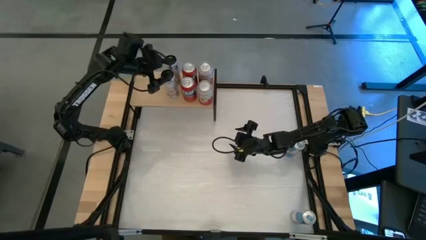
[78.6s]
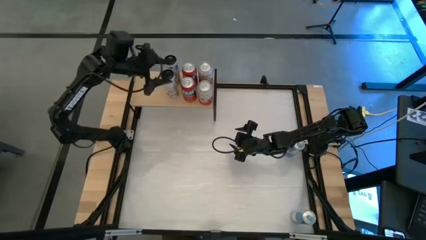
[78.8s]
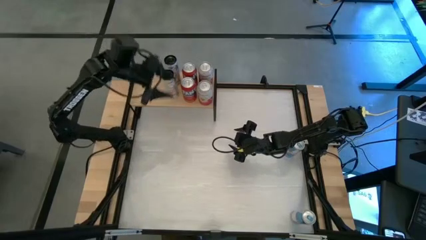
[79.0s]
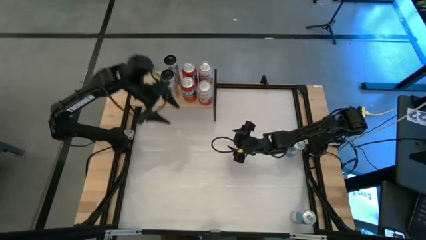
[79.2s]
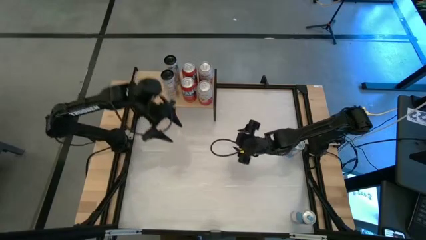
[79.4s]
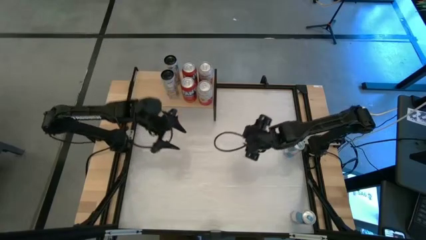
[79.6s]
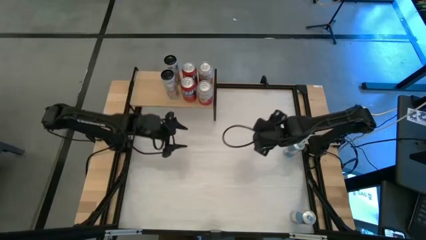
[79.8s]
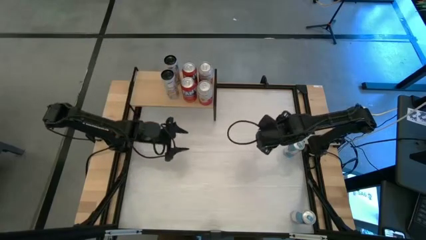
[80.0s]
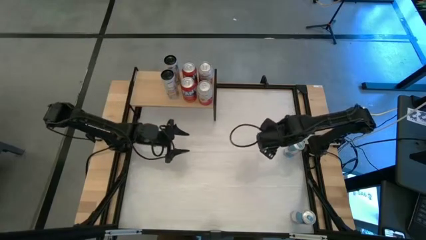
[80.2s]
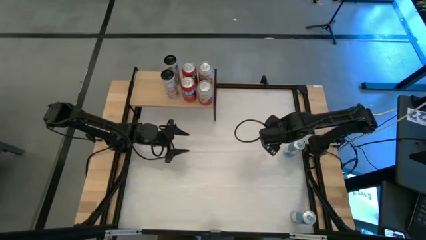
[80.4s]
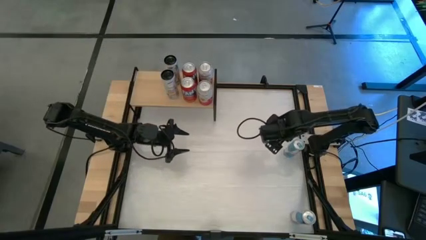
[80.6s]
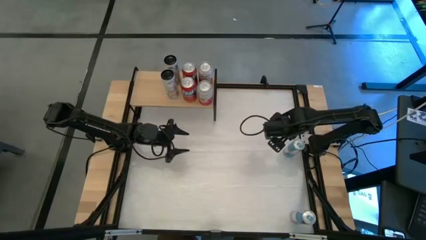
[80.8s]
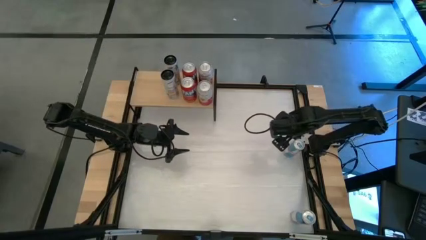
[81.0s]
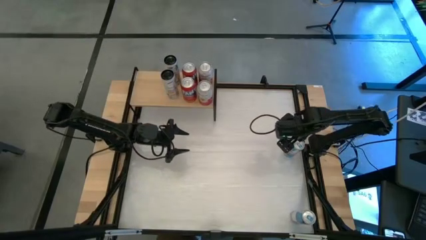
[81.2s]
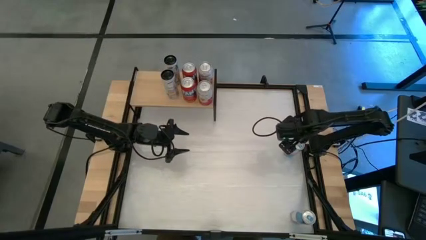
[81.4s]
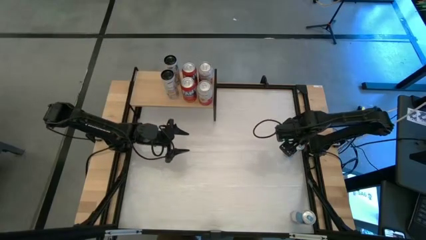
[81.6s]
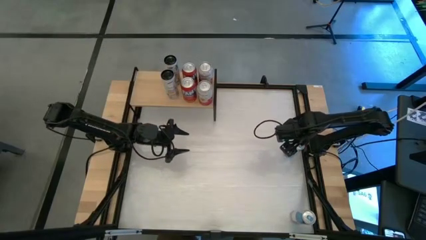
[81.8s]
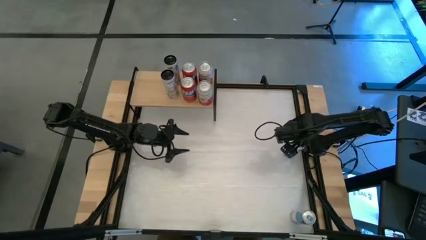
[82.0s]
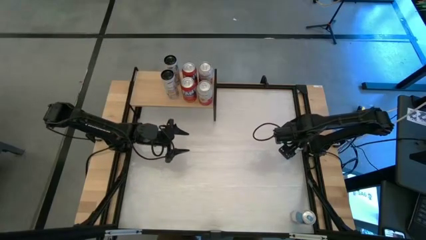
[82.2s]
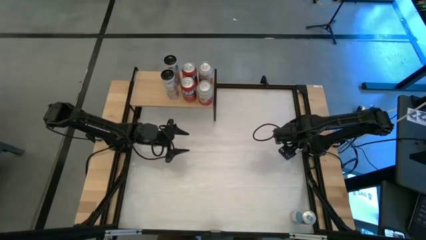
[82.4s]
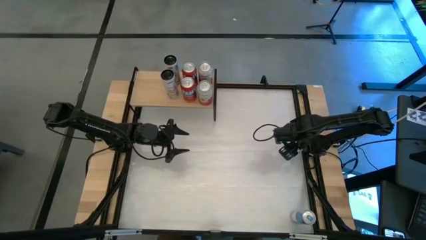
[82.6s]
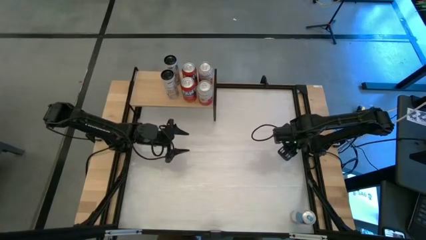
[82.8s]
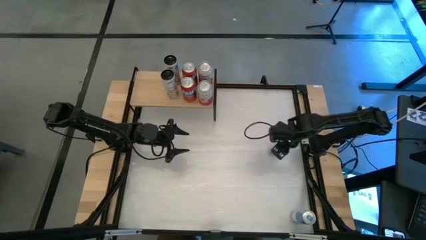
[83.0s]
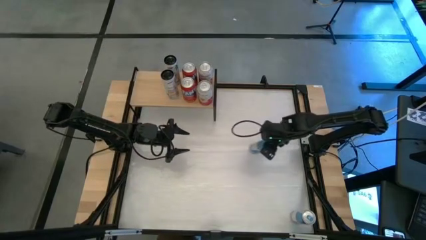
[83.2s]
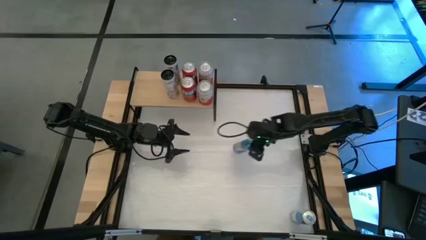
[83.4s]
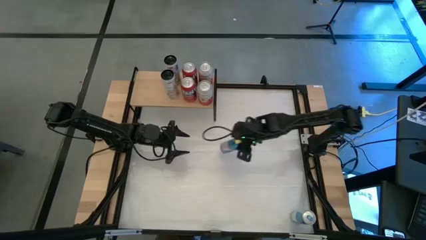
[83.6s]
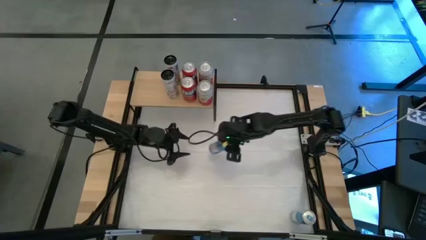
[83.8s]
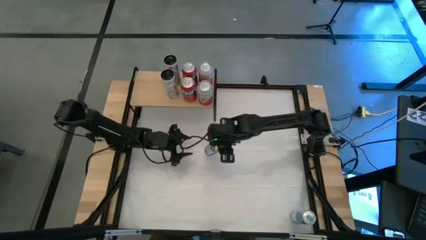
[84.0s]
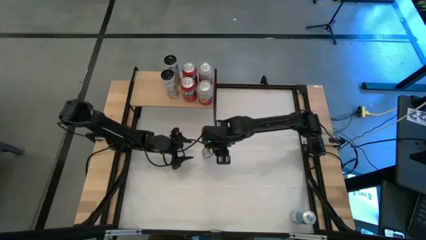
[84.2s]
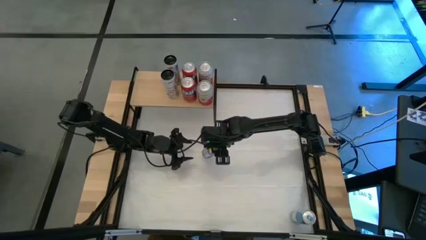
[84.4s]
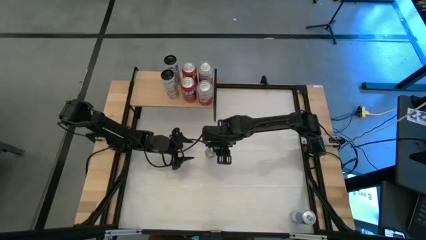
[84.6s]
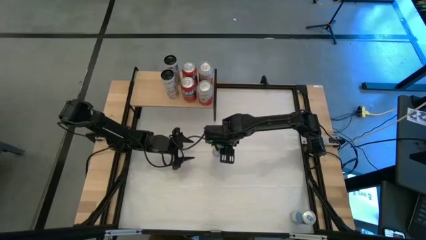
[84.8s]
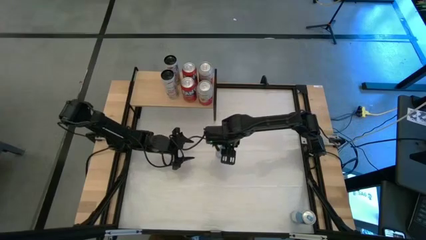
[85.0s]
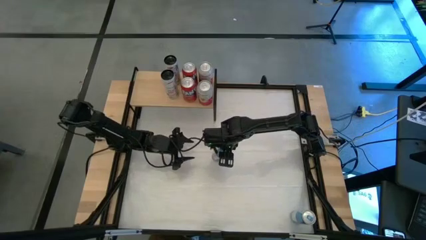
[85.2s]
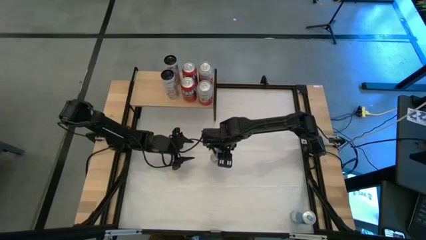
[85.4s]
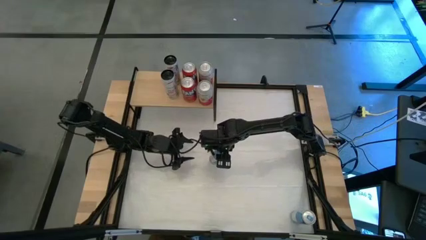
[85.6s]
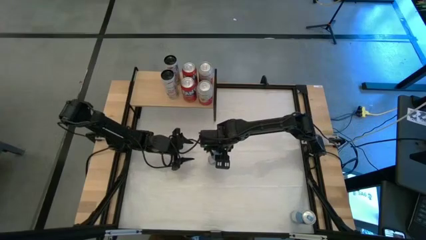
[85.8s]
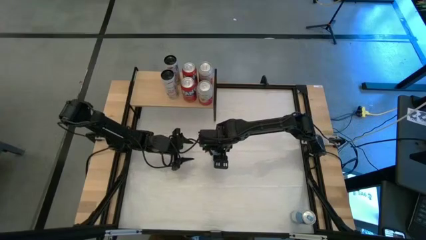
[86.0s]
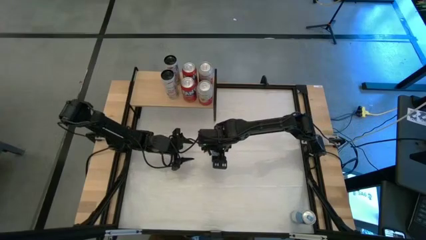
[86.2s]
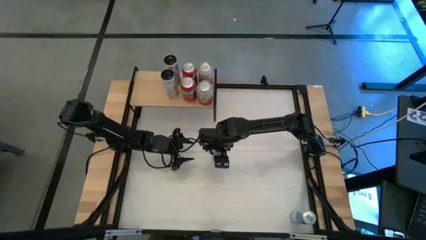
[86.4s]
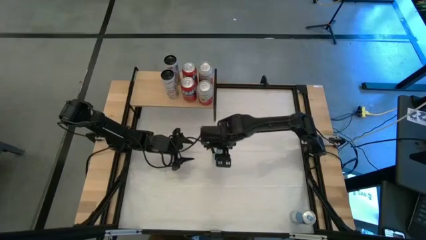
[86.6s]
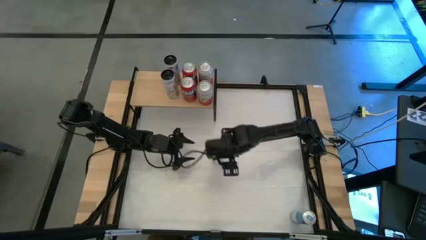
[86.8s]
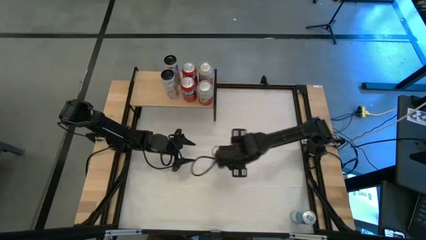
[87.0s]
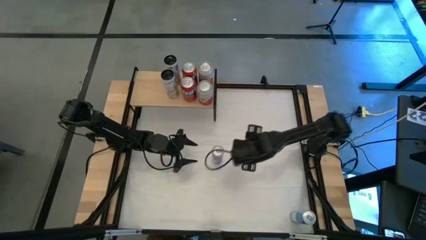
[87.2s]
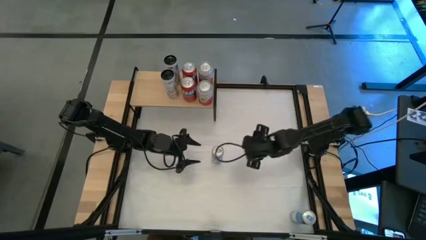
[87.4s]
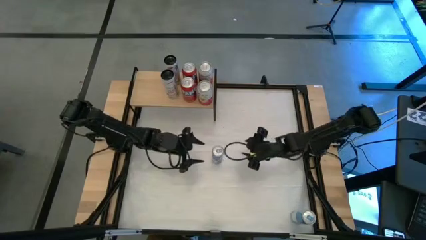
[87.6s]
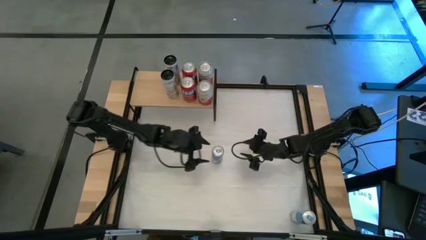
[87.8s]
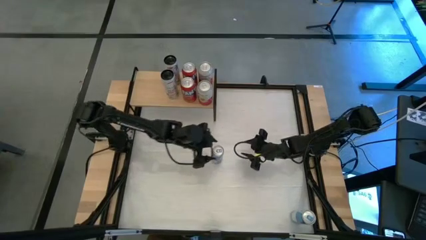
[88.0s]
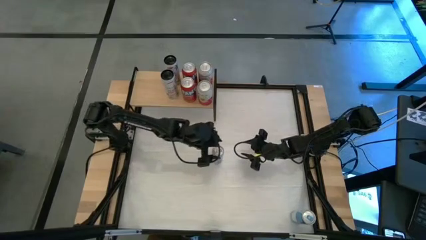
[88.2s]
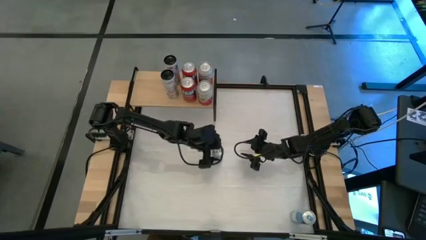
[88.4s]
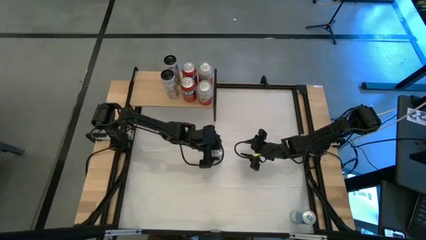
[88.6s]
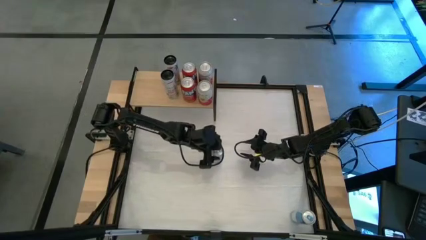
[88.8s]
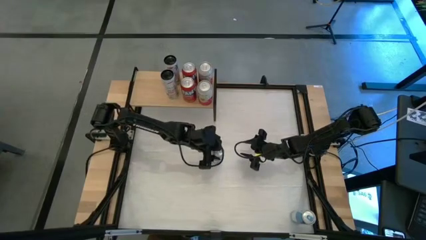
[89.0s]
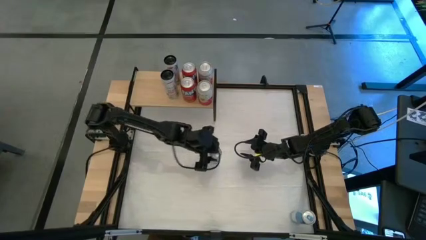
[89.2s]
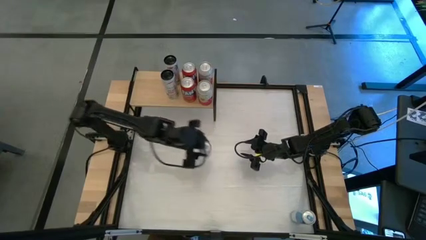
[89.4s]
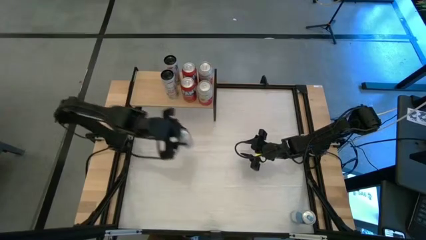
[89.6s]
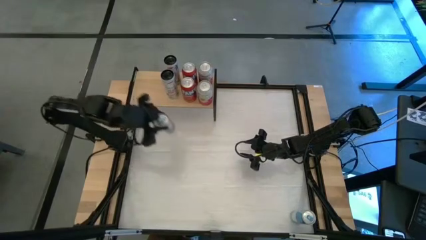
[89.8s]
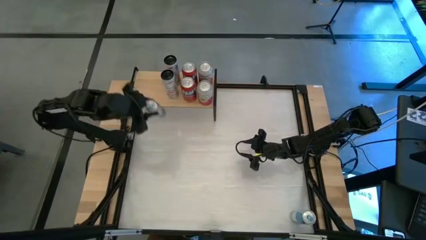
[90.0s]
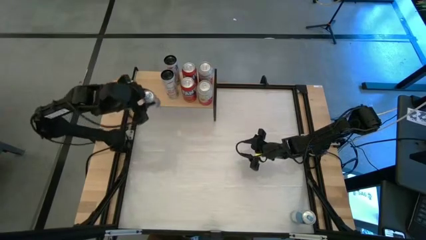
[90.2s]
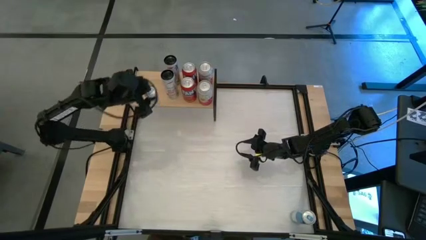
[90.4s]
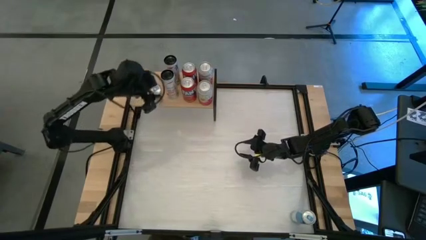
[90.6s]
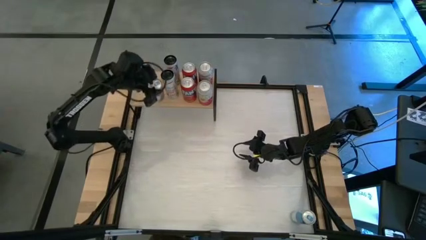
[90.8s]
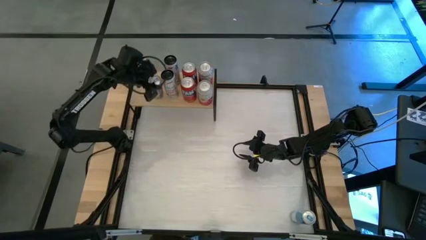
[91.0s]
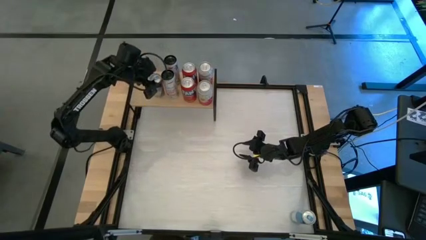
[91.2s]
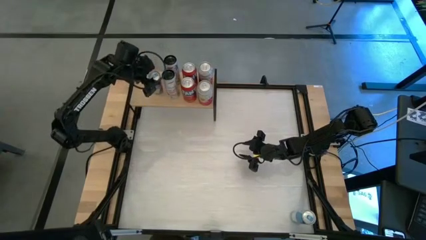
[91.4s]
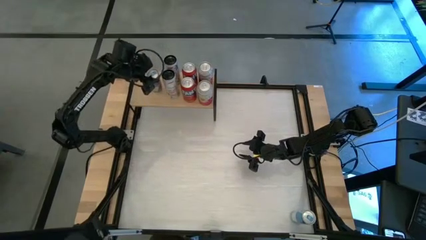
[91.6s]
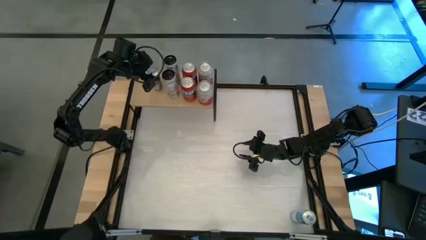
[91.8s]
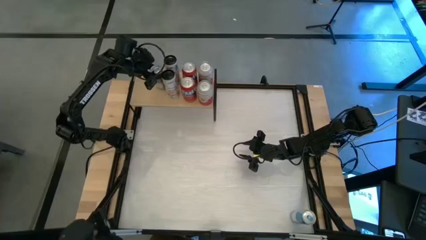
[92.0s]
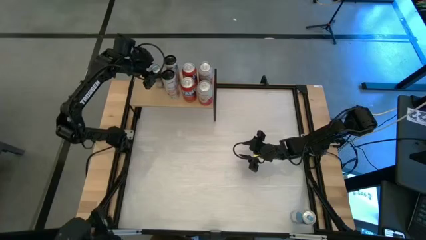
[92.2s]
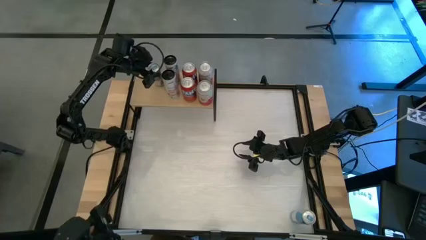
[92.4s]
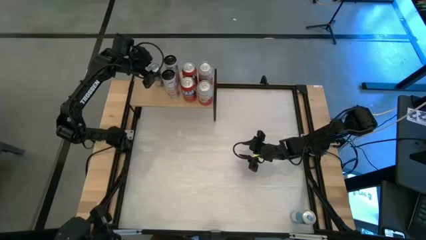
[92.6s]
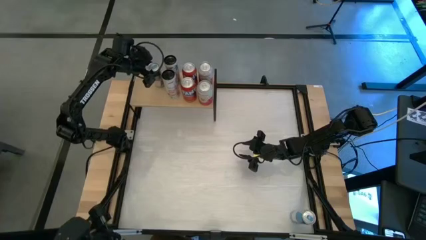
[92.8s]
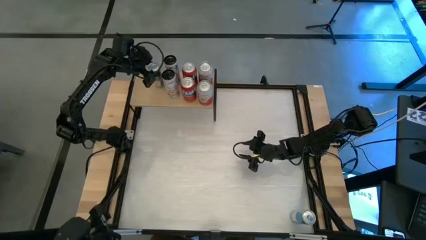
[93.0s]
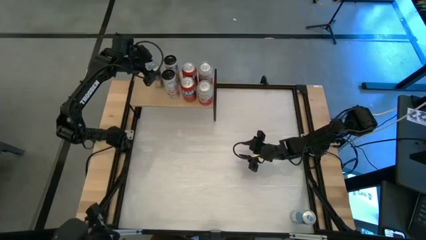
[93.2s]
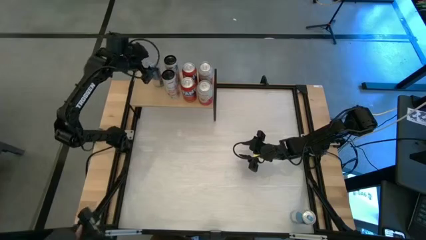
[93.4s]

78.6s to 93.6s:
Task: Place canned beverage on shelf
Put the top blue soda can on the shelf
